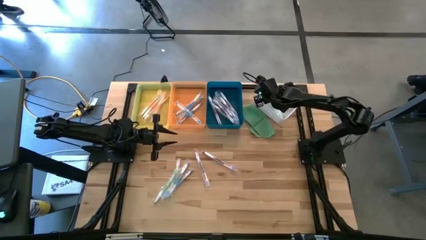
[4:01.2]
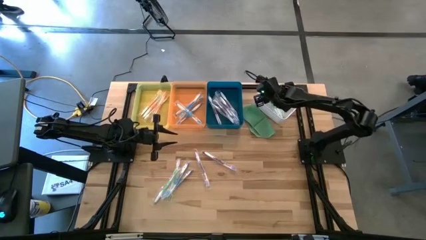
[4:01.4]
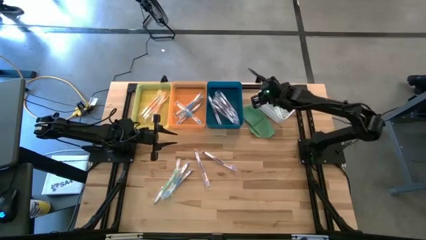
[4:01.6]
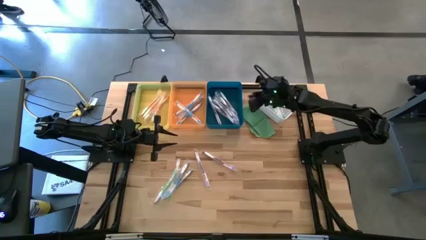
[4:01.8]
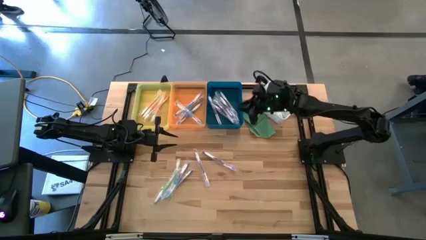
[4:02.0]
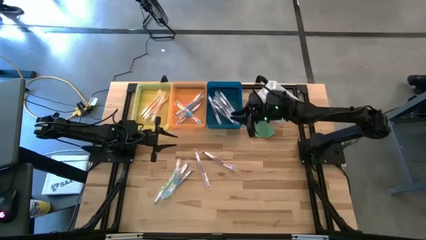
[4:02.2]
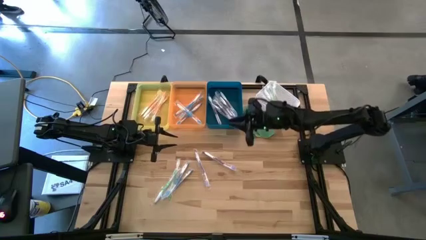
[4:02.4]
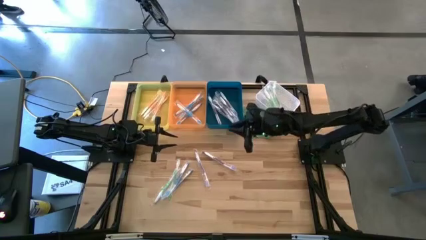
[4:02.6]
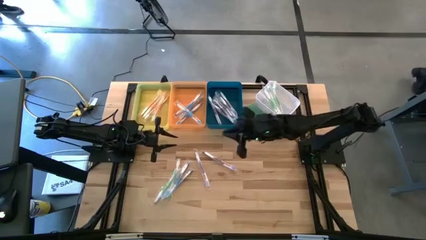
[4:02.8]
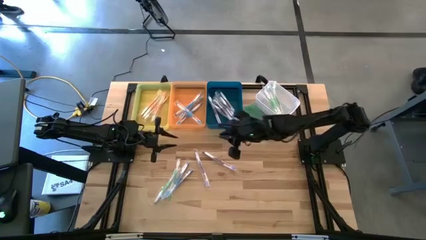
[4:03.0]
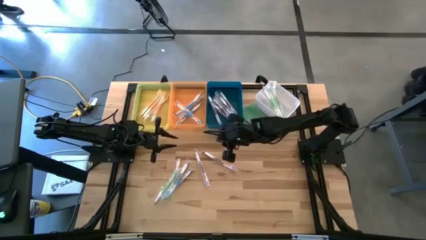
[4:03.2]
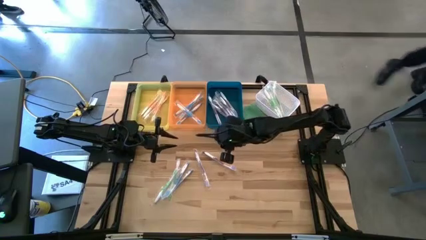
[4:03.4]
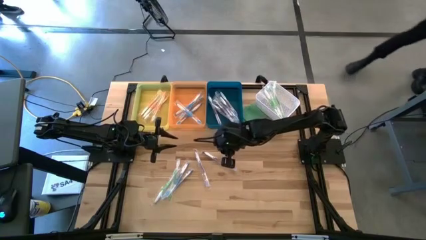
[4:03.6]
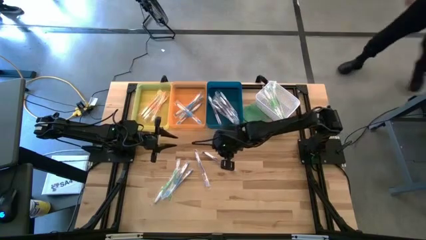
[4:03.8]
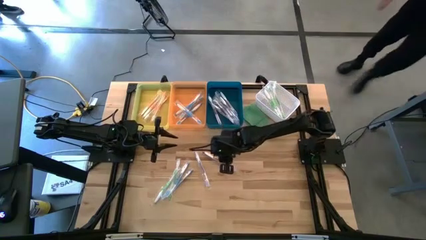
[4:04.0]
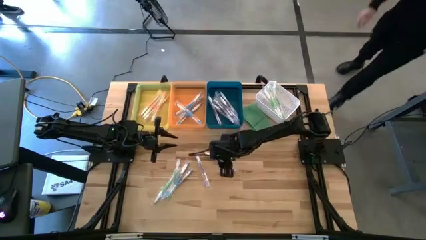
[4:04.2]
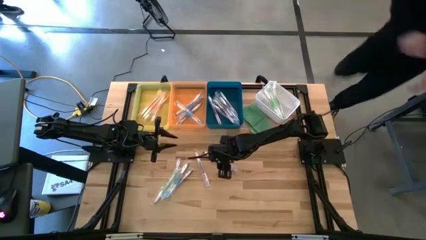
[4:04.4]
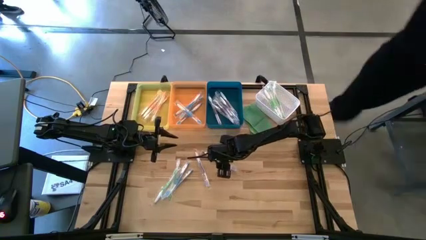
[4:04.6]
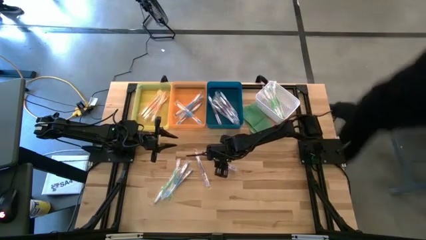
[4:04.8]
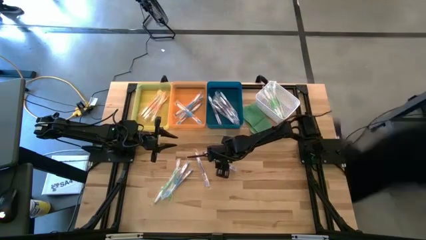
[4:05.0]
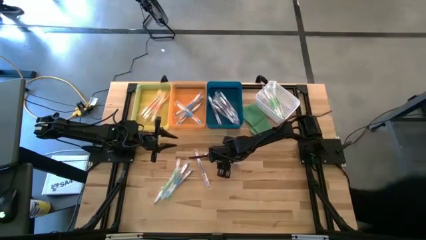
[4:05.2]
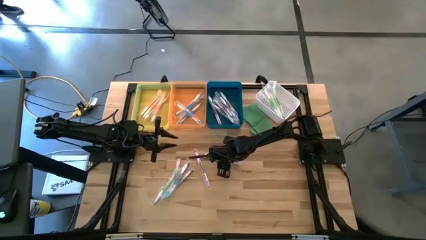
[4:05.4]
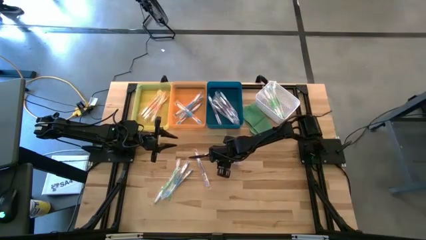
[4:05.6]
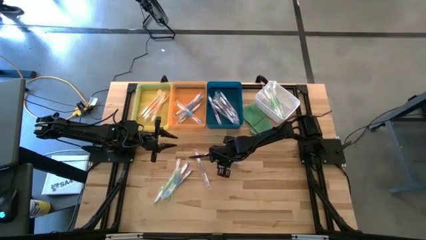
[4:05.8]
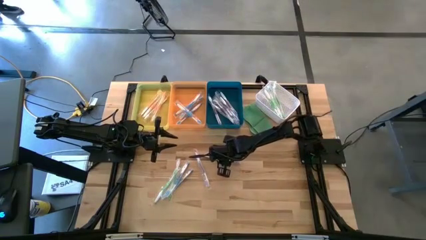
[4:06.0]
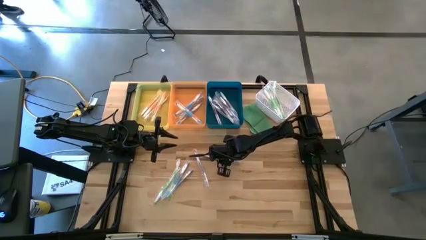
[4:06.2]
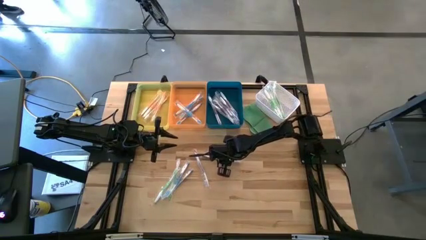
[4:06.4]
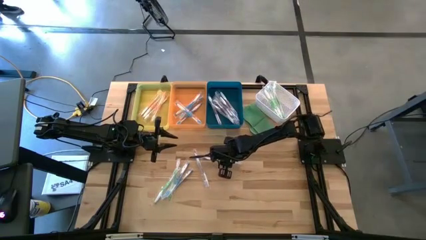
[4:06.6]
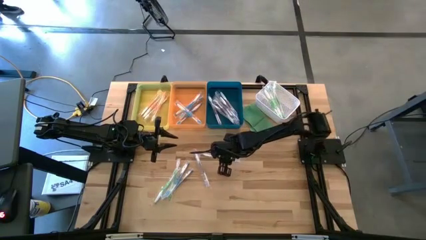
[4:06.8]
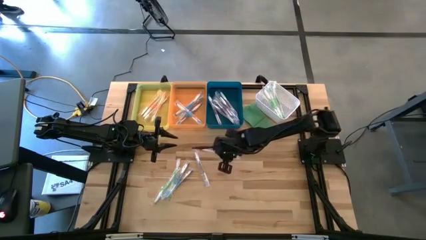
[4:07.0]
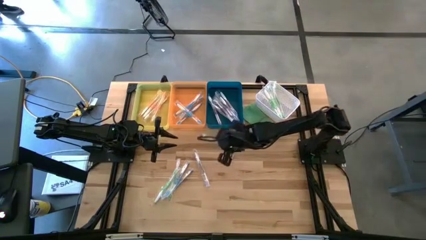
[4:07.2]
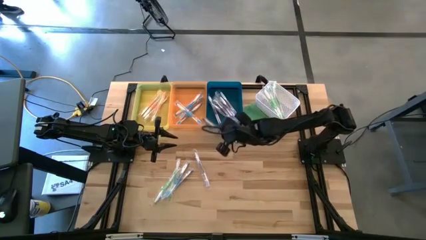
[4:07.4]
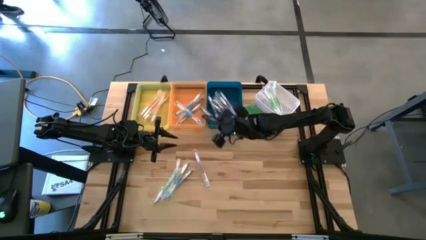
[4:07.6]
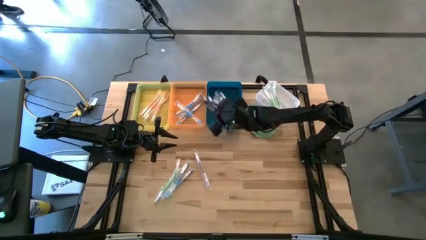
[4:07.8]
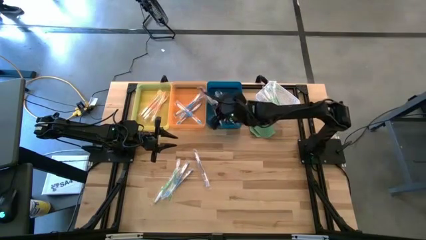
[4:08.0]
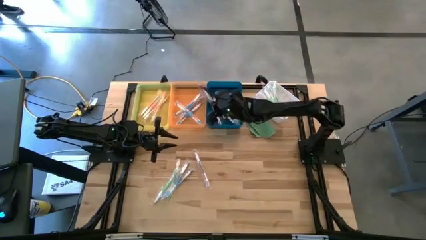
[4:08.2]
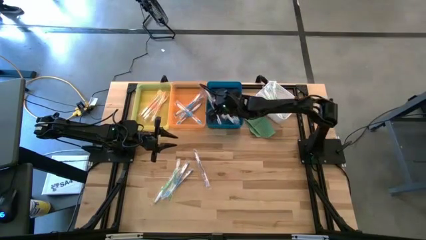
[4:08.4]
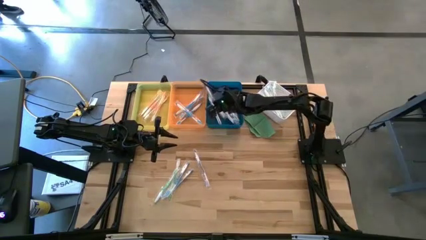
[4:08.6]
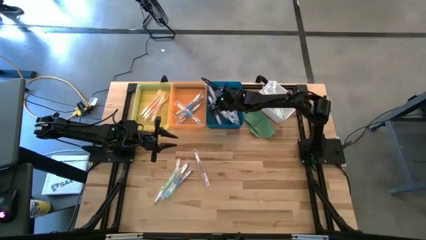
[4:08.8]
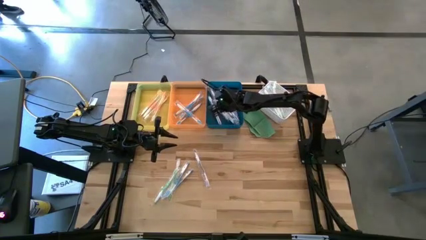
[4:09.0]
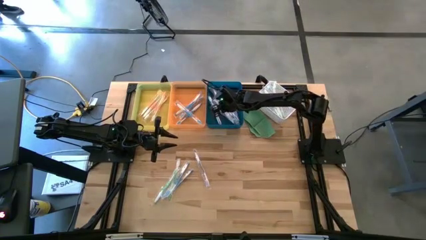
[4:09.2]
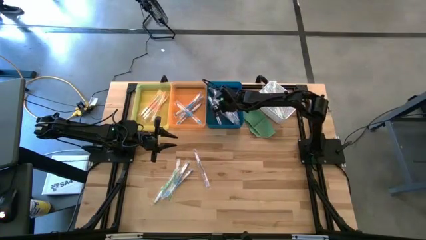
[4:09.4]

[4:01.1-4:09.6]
Task: Pick & Place Toothbrushes
Put the purple toothbrush into the blue bin

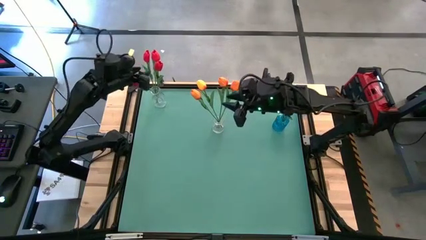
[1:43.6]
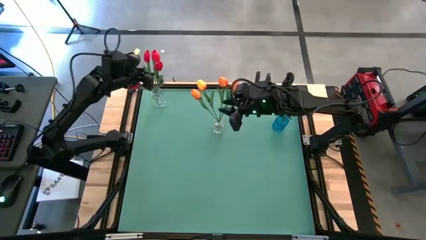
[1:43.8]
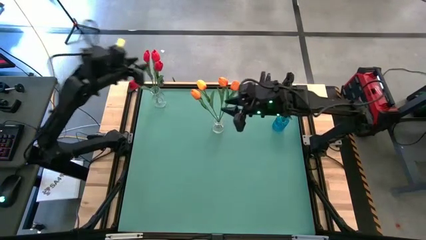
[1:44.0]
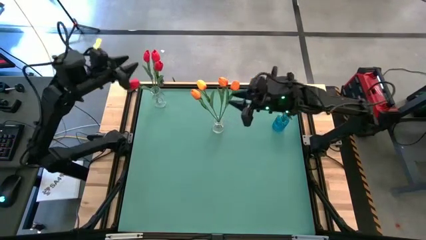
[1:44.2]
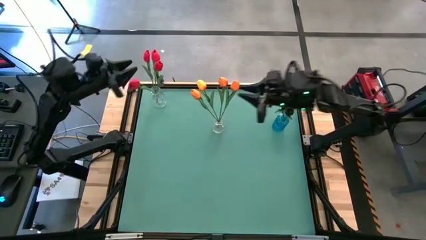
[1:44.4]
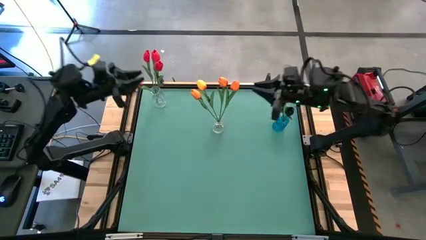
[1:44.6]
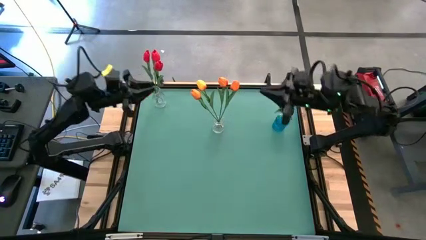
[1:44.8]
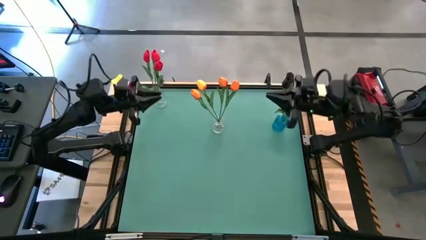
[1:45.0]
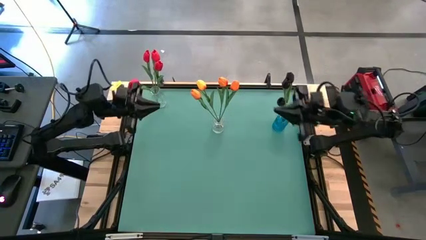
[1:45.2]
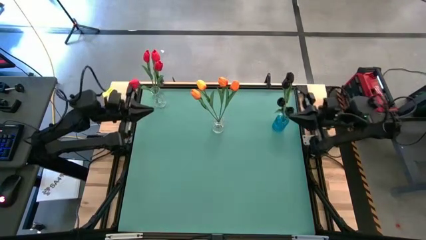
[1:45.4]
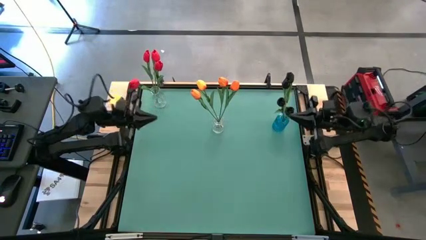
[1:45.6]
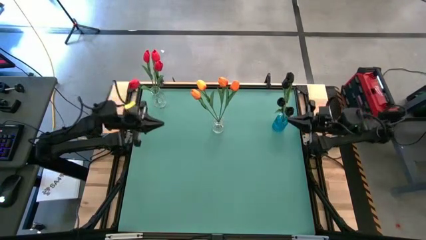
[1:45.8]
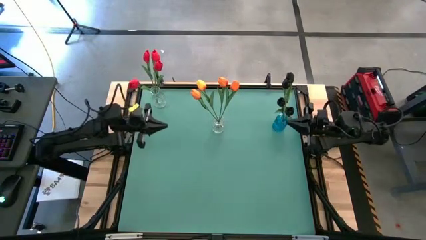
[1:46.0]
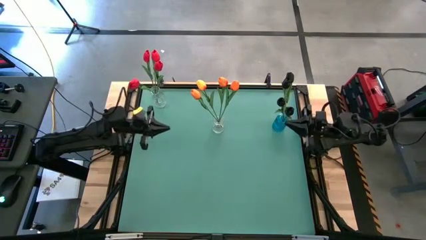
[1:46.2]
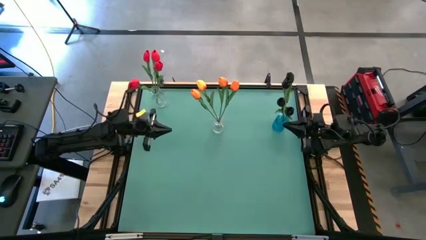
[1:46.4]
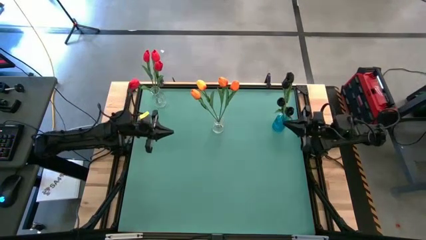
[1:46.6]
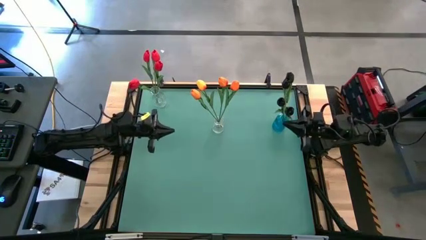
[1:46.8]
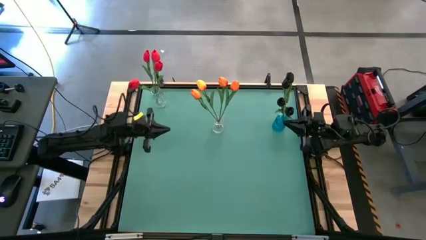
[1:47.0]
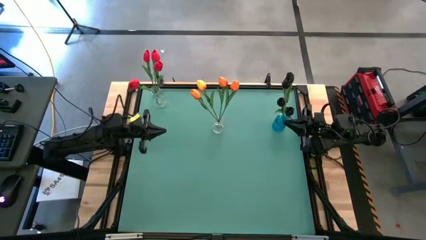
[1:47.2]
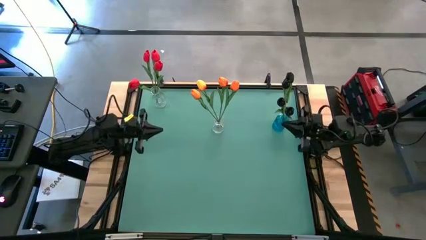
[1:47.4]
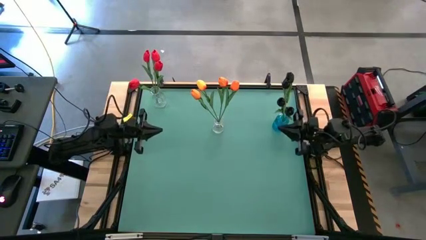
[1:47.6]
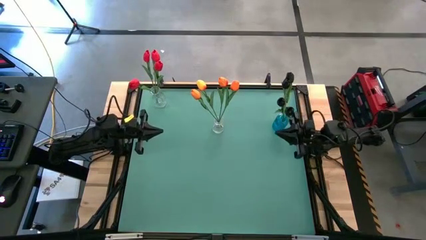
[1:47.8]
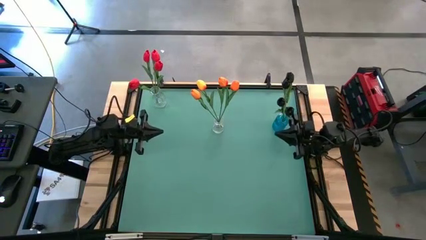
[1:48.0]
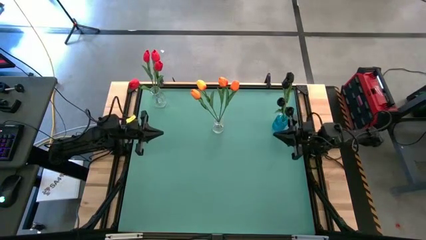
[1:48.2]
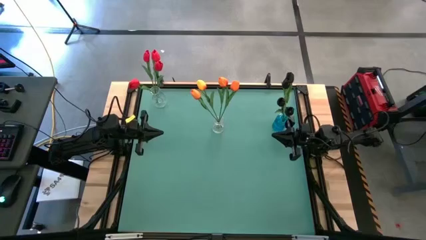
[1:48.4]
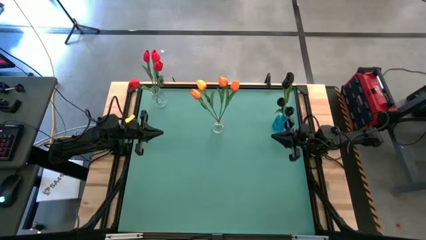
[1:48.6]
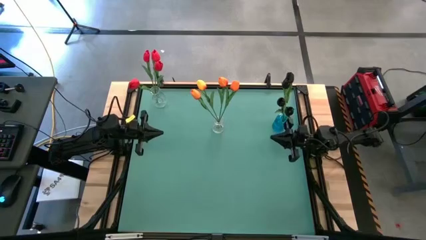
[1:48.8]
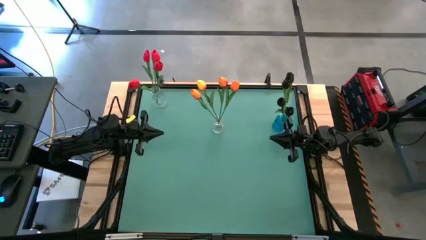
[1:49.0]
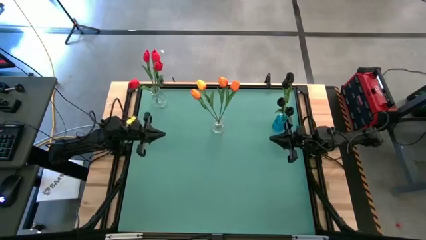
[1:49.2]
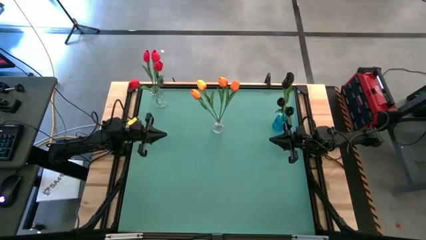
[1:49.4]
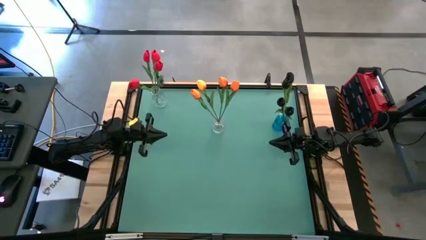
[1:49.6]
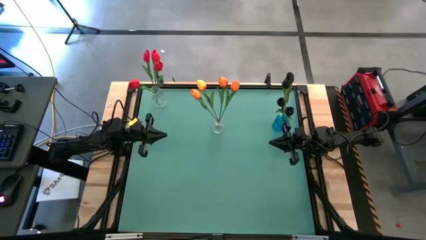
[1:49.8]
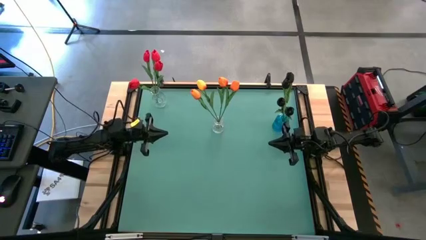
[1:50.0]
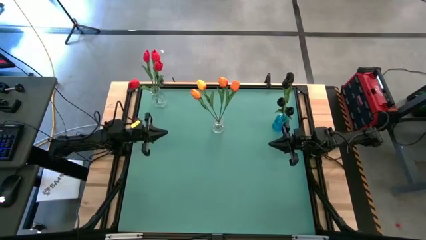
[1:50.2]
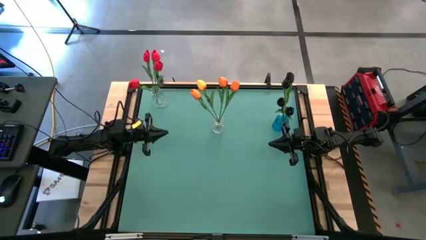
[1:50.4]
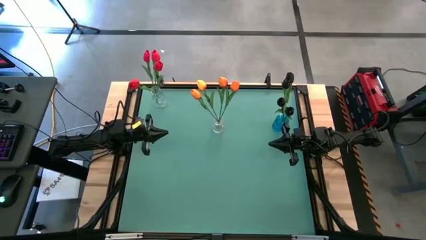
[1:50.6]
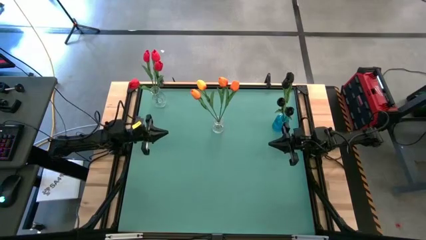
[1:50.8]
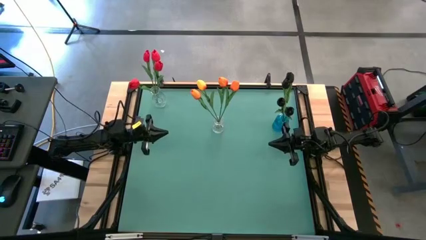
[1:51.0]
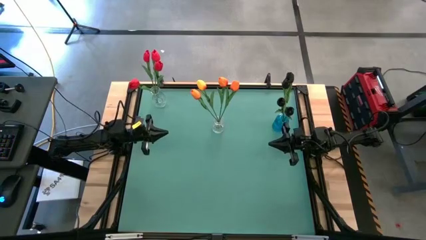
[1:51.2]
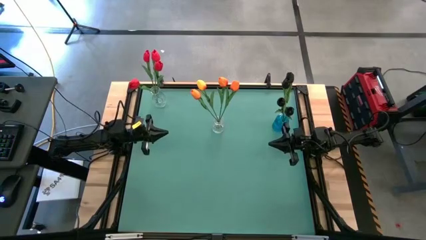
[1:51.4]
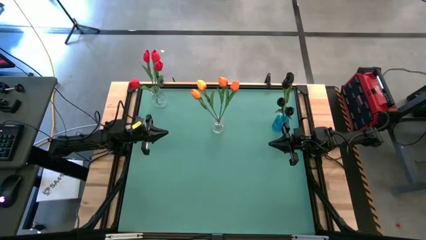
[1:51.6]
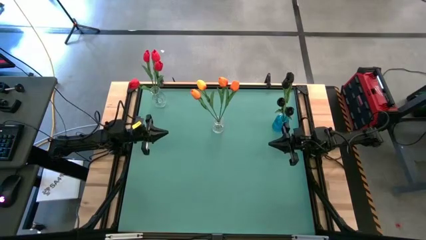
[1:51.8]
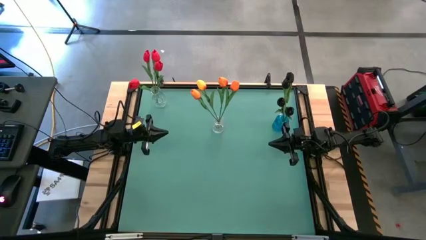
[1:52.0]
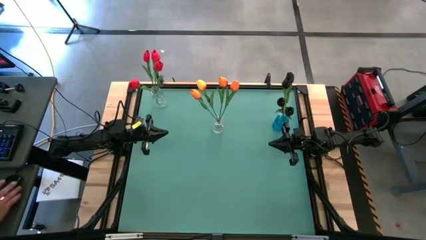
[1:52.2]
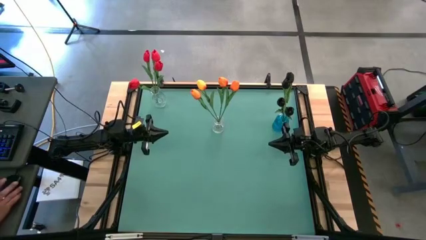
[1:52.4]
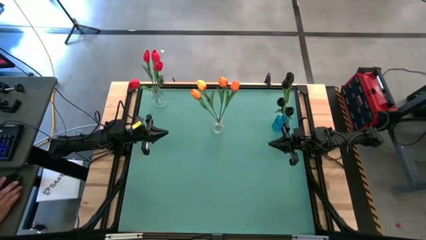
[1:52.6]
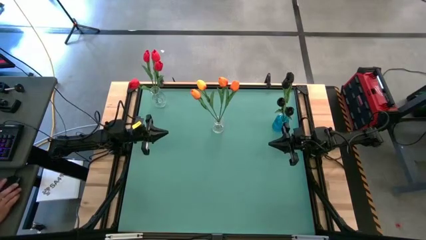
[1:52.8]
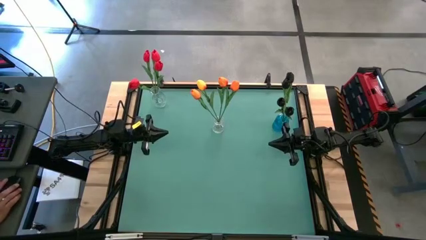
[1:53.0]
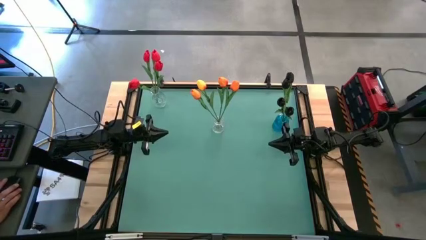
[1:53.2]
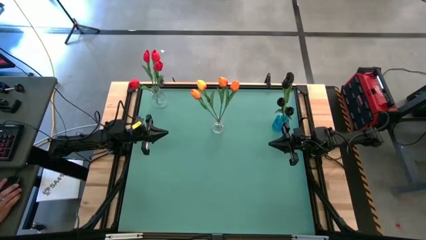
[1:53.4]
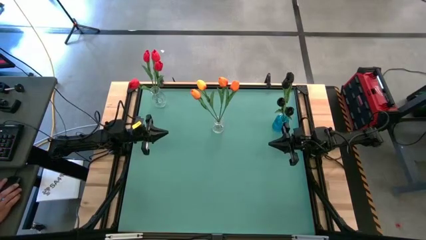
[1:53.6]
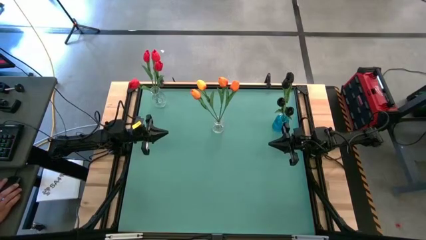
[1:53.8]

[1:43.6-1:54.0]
Task: Sort flowers into vase by color
Return to Home Position
